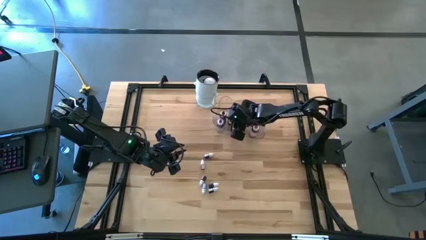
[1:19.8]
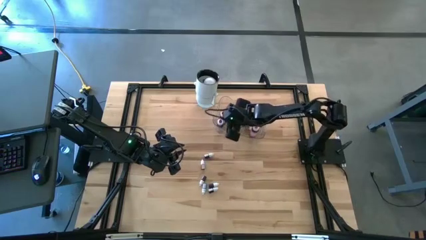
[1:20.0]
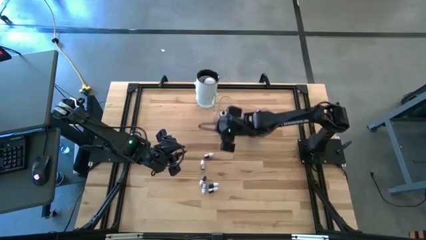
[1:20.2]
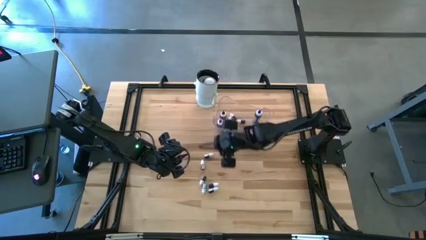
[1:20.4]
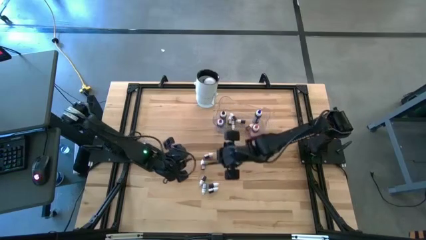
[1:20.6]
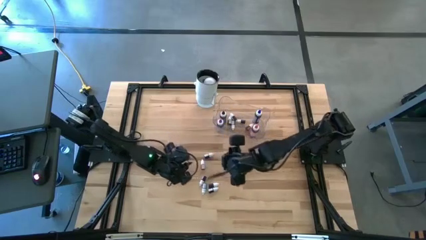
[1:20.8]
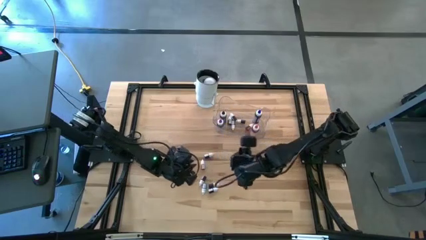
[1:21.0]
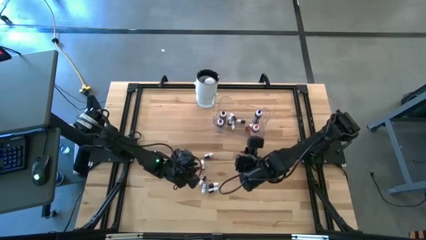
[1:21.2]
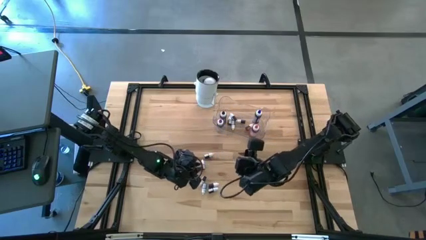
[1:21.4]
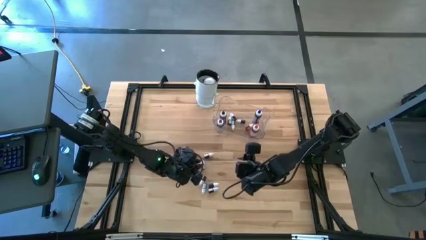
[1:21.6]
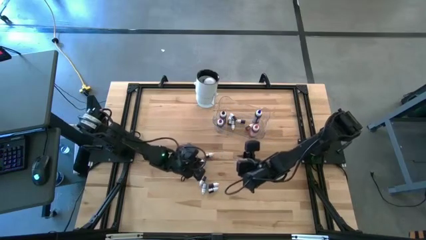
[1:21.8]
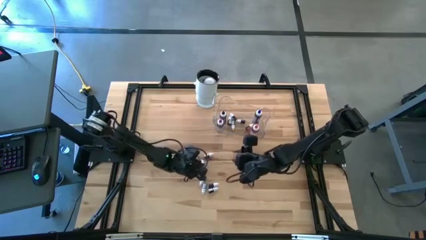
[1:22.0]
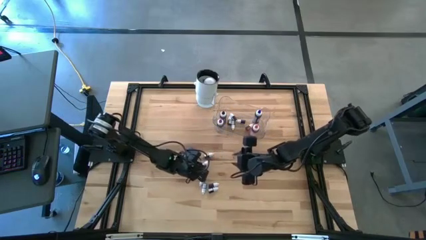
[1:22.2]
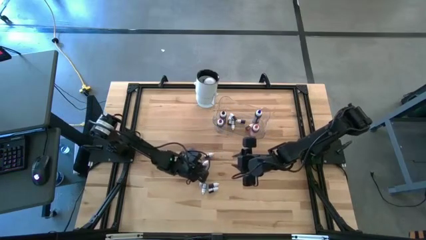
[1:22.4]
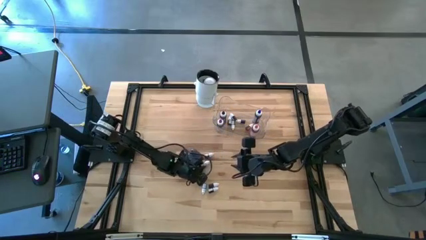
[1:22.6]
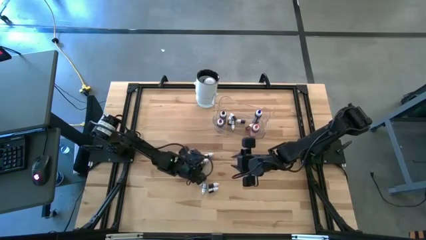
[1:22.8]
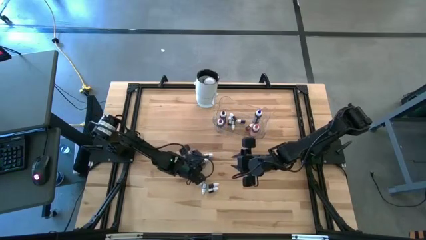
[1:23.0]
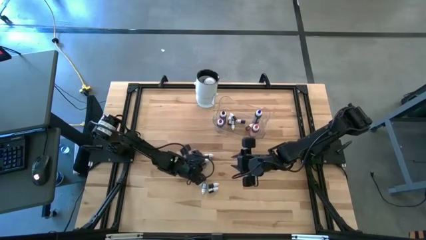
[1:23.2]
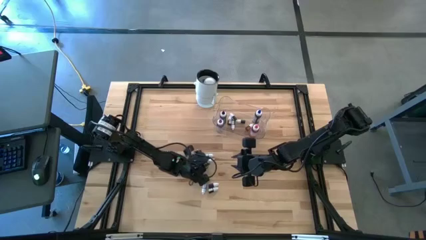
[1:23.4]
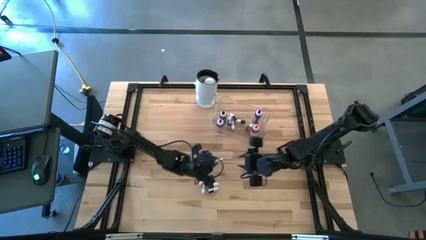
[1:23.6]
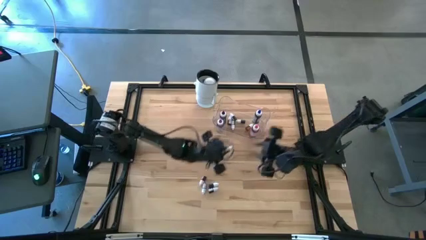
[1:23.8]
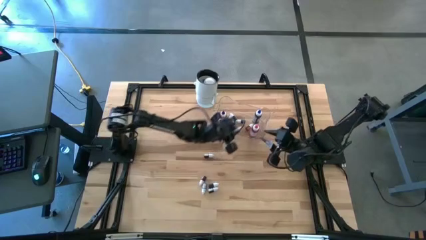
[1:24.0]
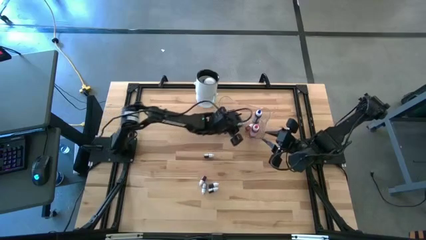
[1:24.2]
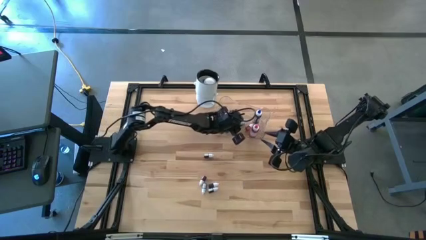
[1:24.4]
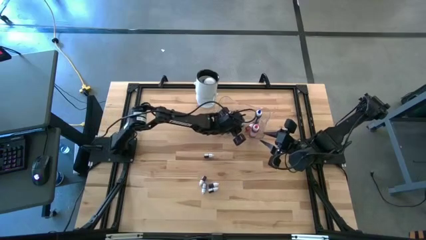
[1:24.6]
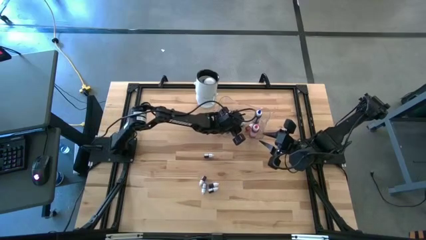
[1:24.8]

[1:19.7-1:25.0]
Task: Pick & Place food coloring
Put the small red food coloring bottle into the transparent container

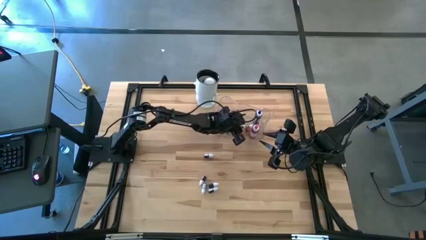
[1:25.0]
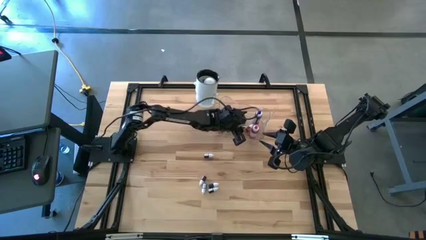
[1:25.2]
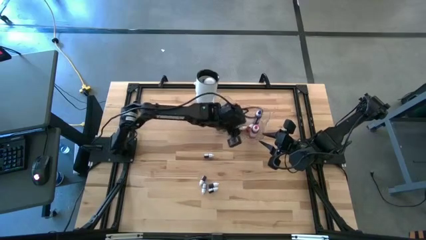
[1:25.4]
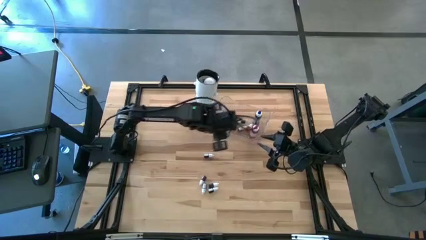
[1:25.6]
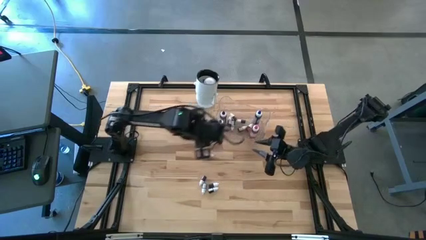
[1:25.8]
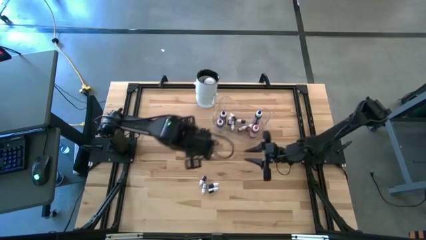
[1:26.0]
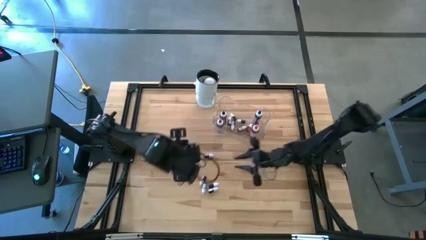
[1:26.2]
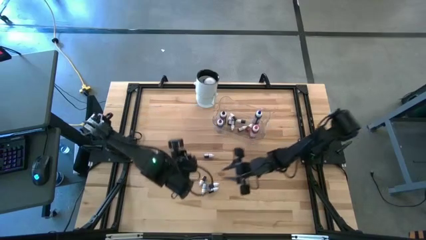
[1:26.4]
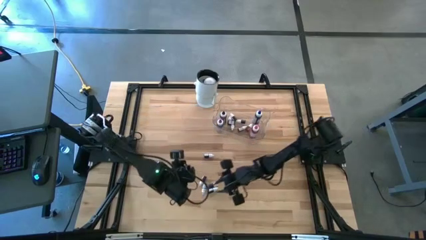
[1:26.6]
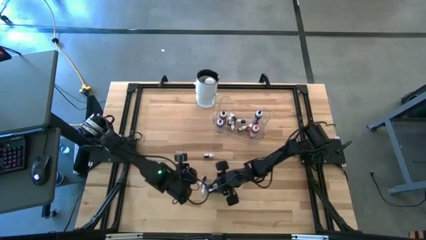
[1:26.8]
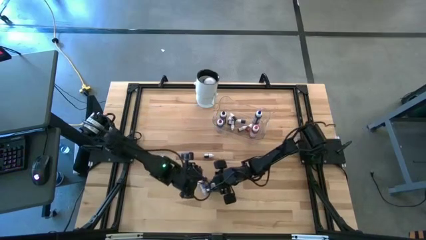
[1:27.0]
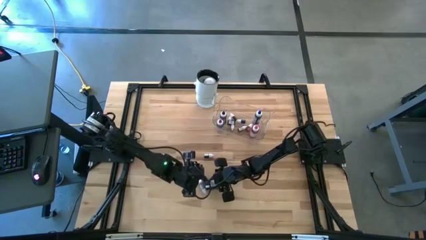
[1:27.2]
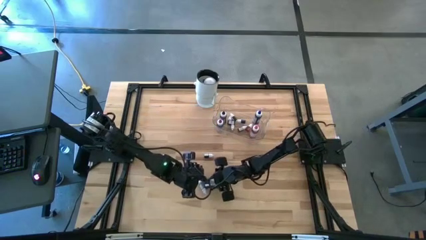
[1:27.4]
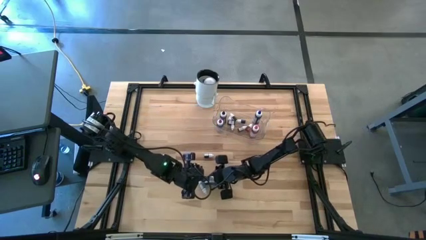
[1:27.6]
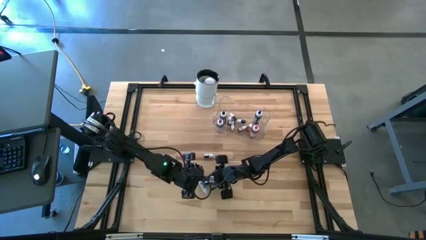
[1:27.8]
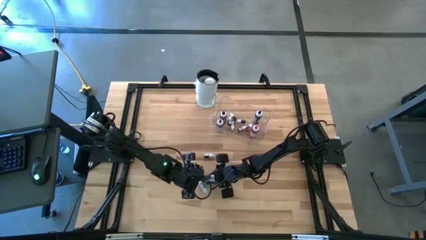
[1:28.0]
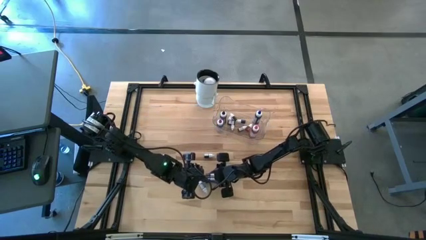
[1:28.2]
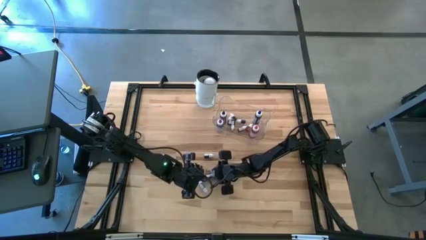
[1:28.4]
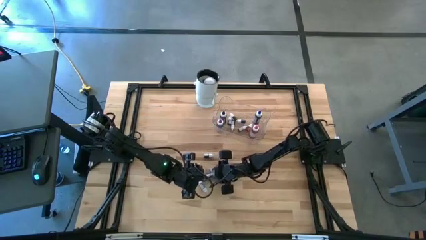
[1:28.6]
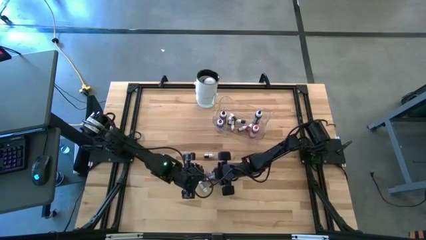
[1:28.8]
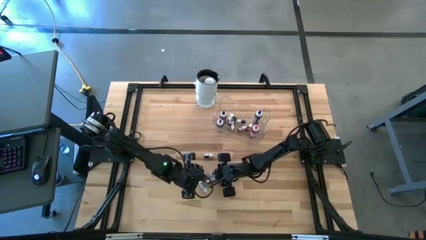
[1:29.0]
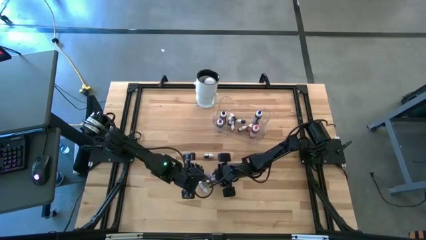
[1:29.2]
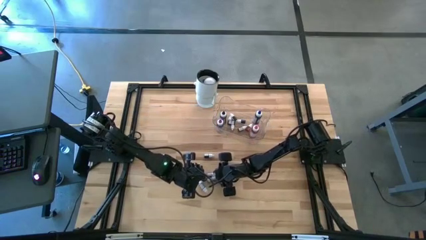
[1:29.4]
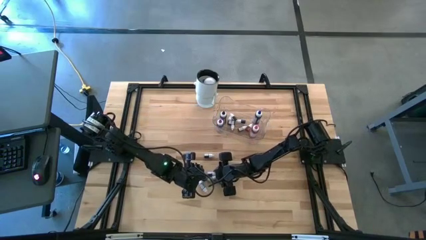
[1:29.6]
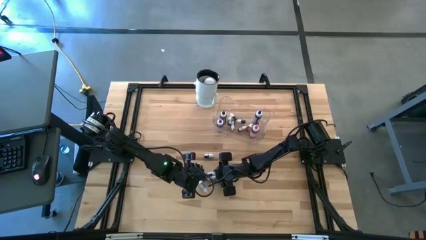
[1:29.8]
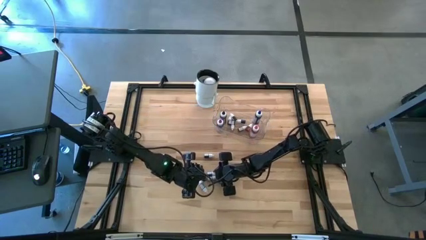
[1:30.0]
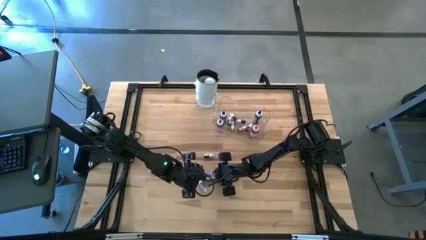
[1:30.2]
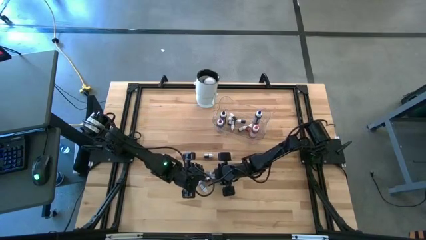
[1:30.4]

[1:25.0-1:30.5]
Put the small brown food coloring bottle into the transparent container

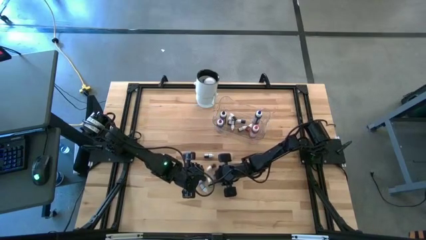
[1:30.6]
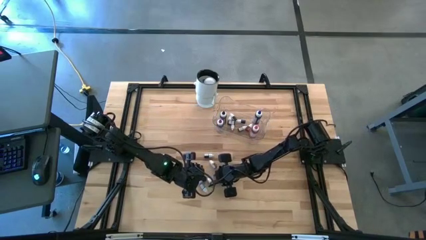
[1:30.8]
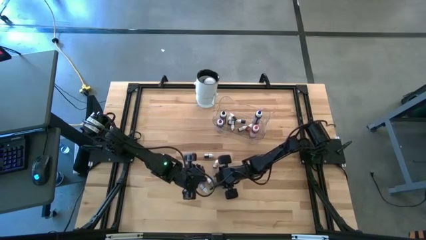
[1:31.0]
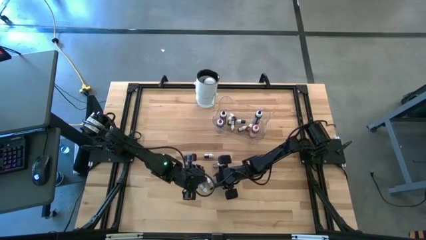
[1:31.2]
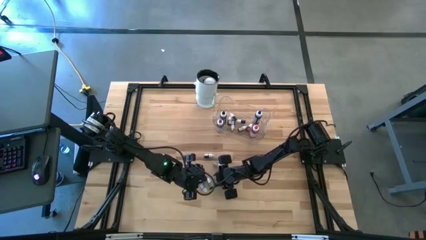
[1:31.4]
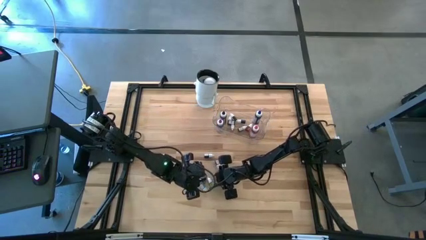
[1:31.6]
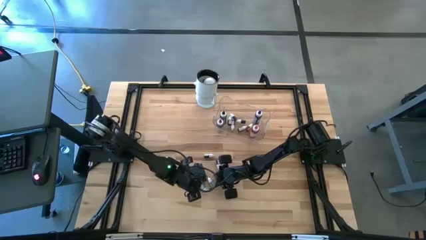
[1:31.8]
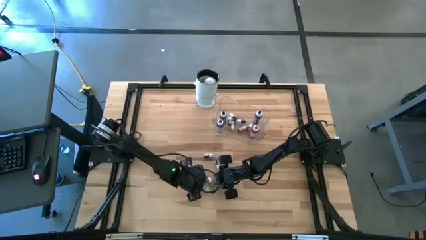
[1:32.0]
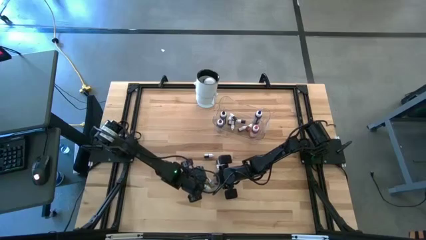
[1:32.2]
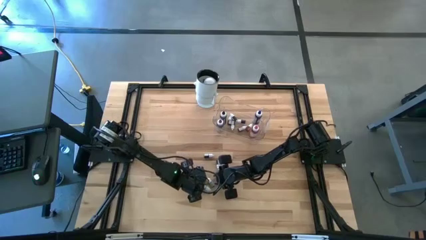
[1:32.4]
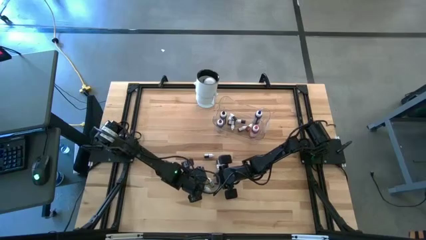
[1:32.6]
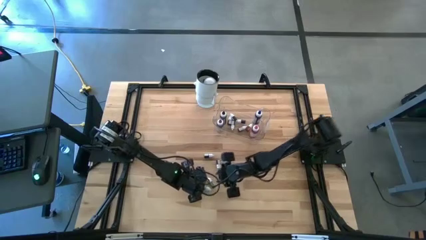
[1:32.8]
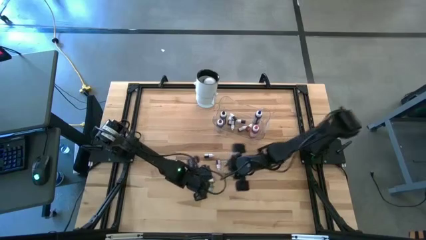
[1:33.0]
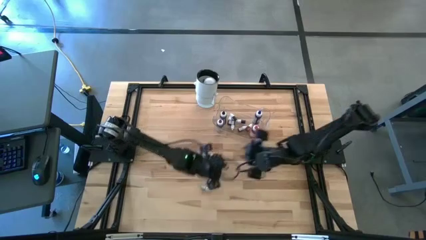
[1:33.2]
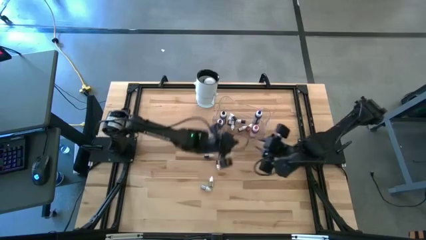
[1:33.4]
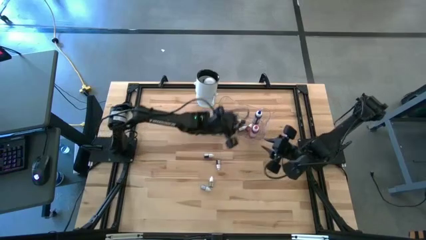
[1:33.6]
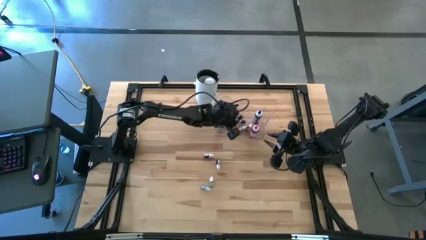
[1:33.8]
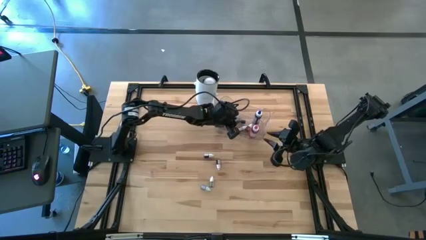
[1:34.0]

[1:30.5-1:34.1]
Put the small brown food coloring bottle into the transparent container
